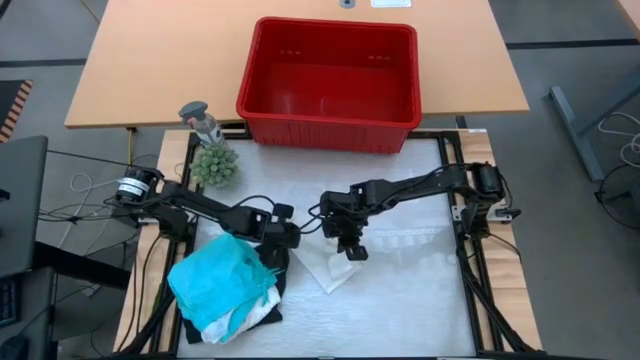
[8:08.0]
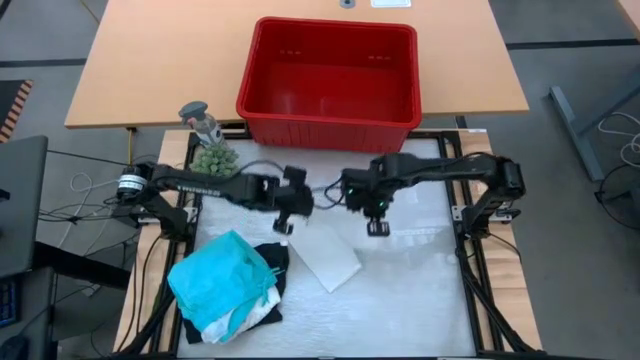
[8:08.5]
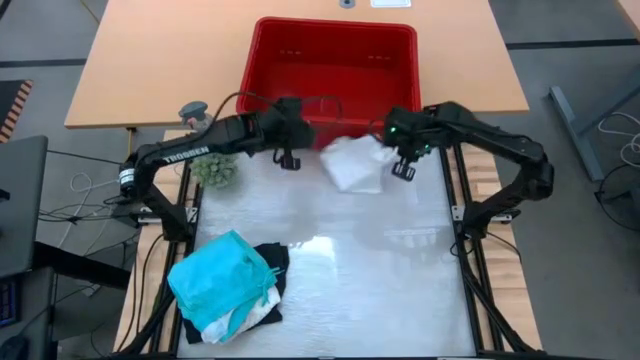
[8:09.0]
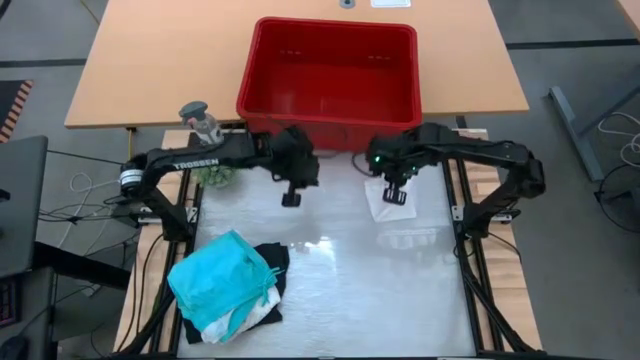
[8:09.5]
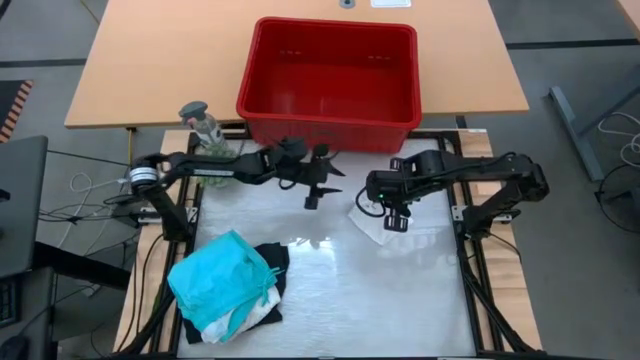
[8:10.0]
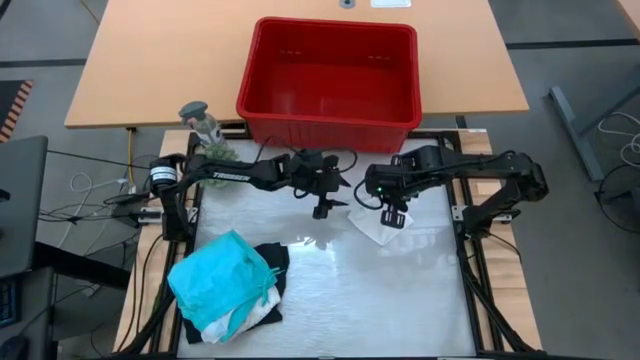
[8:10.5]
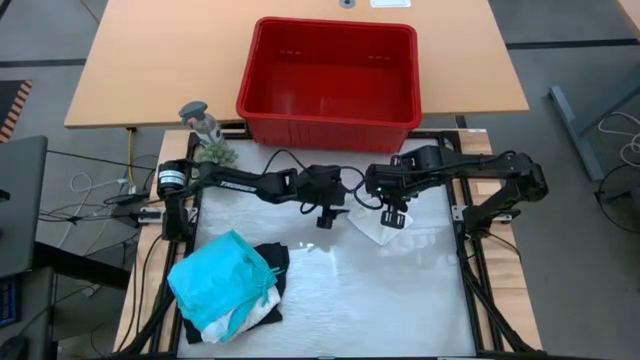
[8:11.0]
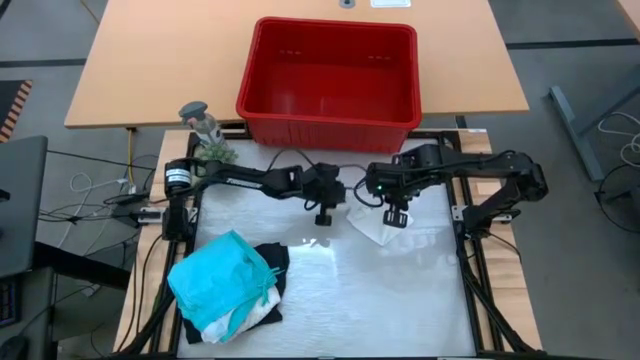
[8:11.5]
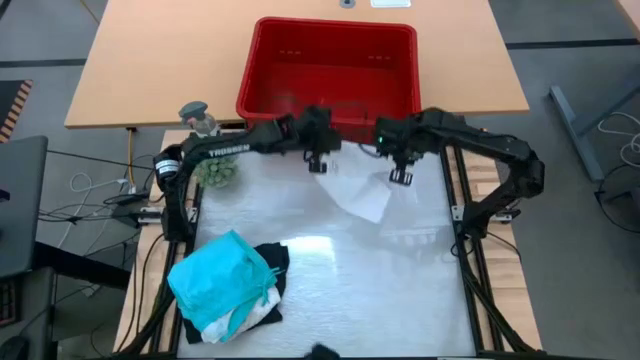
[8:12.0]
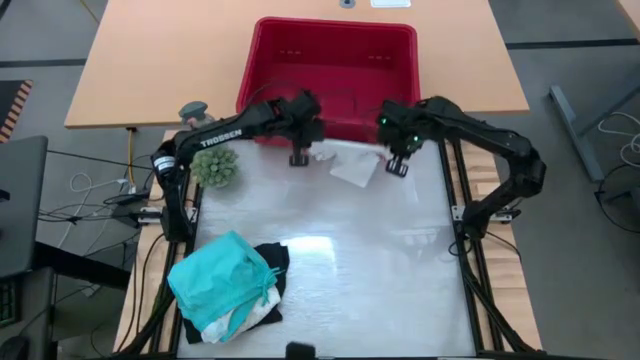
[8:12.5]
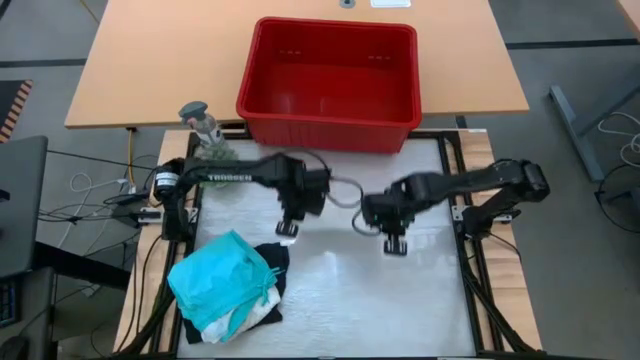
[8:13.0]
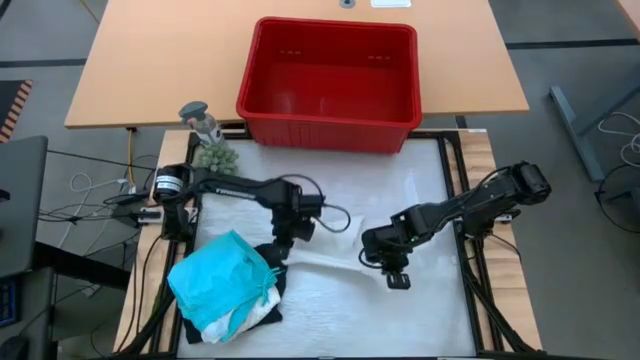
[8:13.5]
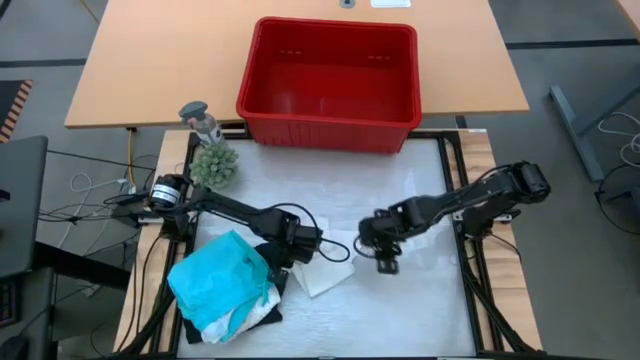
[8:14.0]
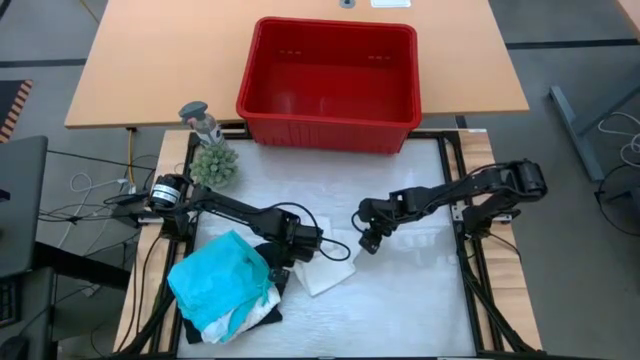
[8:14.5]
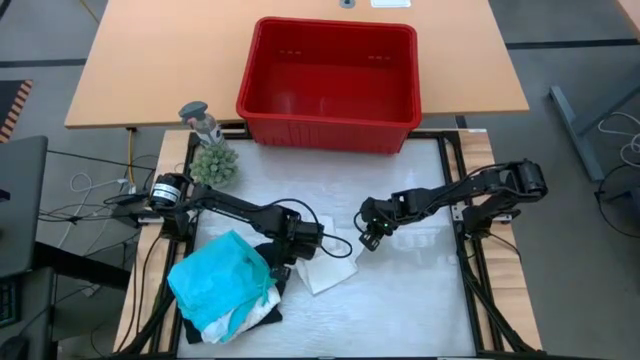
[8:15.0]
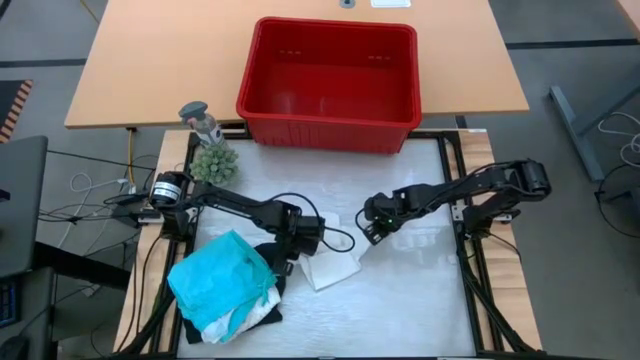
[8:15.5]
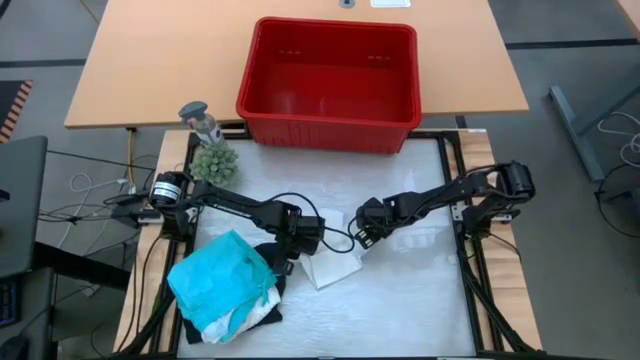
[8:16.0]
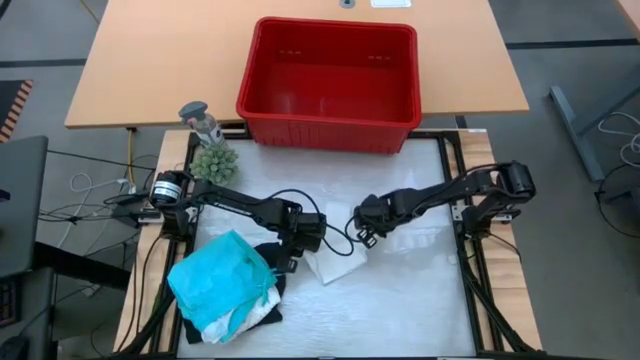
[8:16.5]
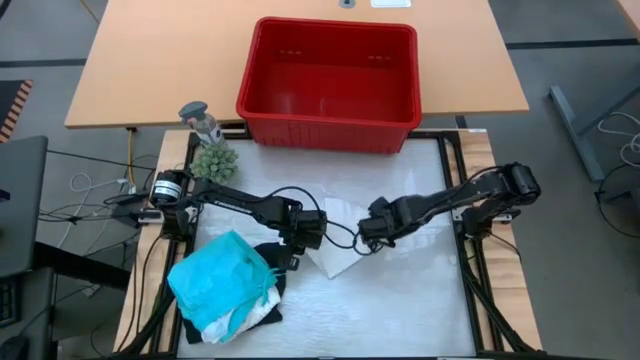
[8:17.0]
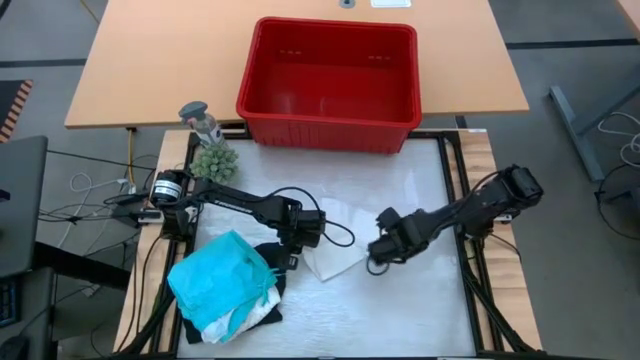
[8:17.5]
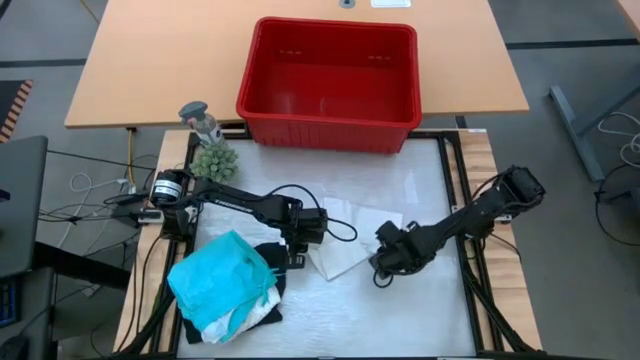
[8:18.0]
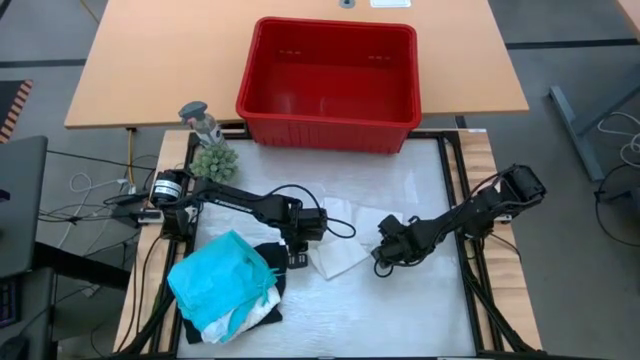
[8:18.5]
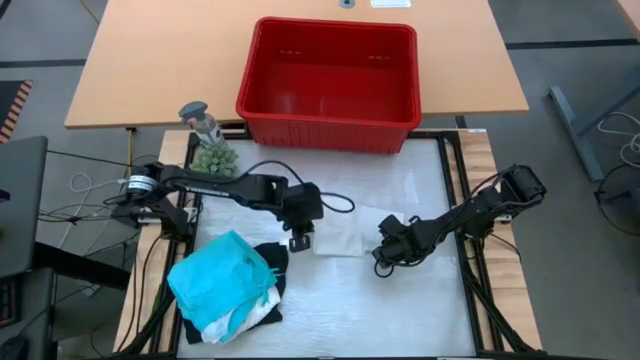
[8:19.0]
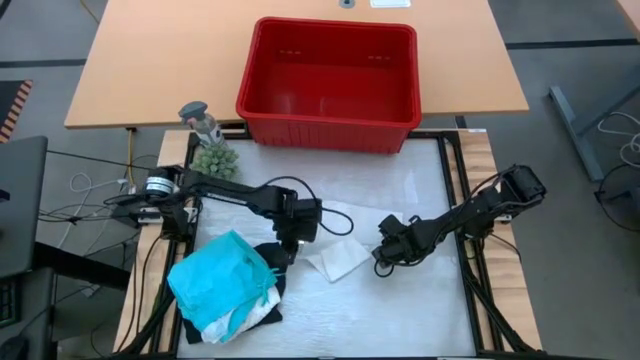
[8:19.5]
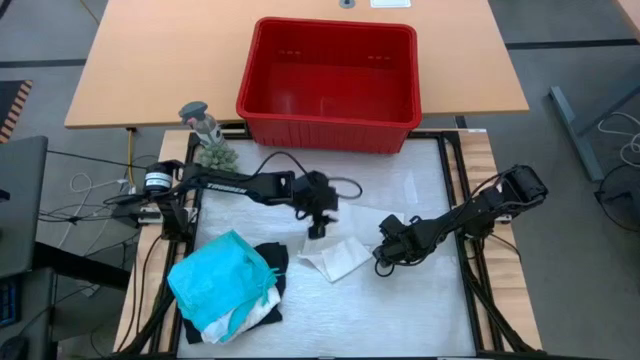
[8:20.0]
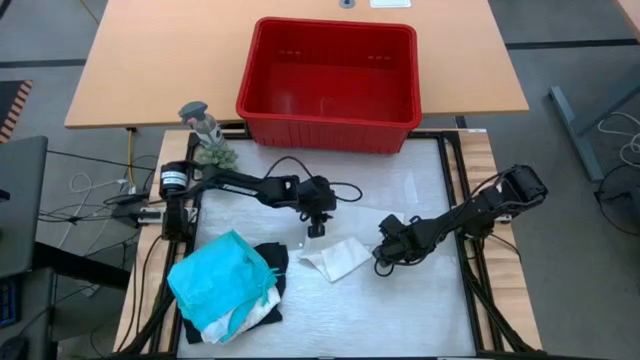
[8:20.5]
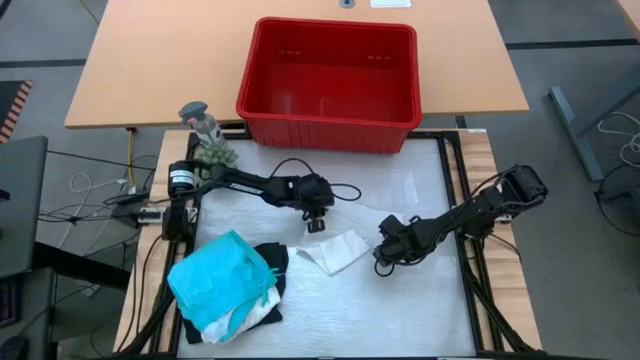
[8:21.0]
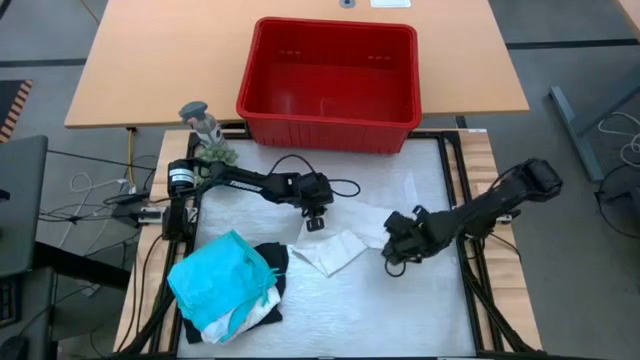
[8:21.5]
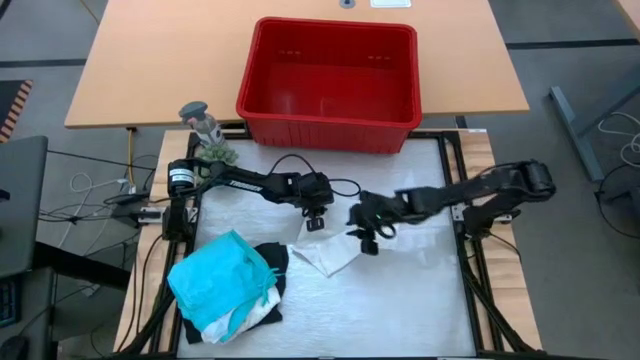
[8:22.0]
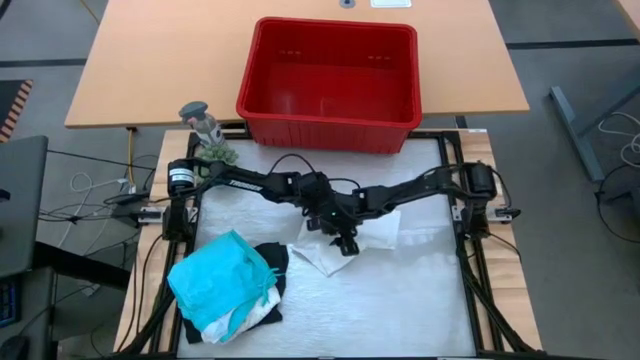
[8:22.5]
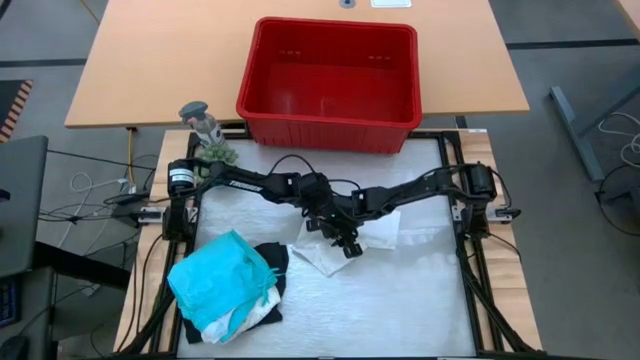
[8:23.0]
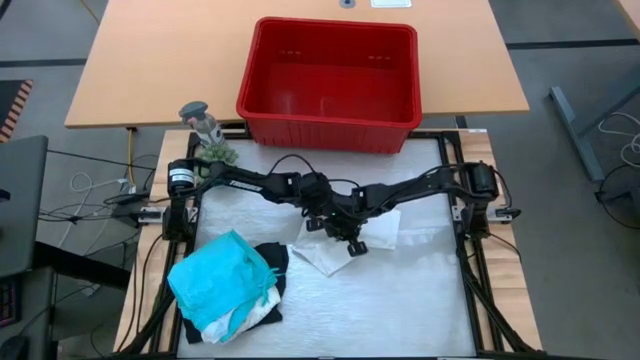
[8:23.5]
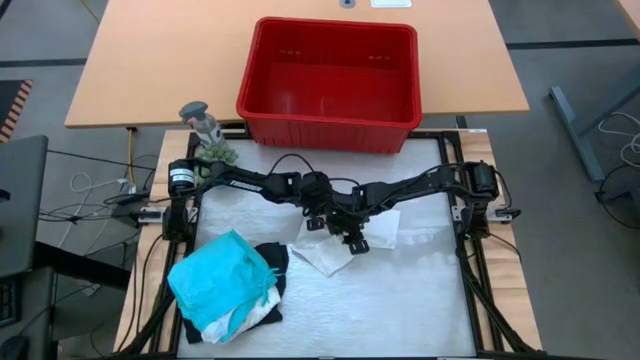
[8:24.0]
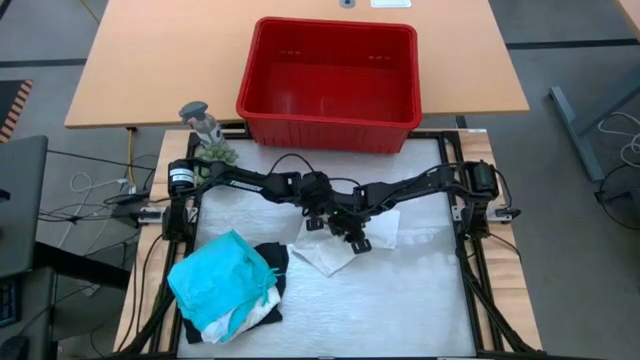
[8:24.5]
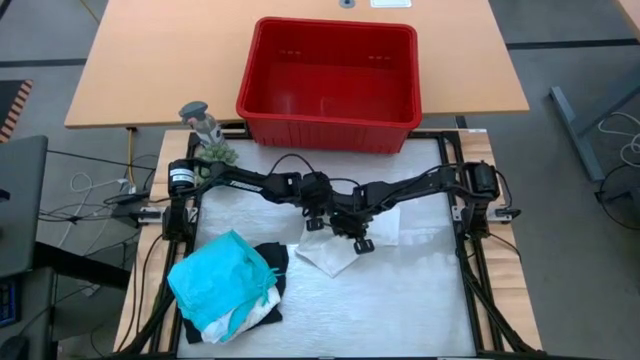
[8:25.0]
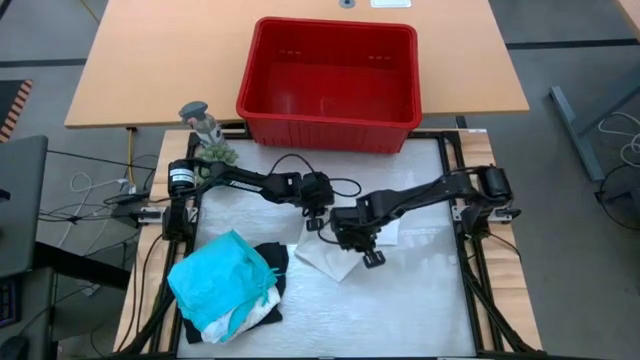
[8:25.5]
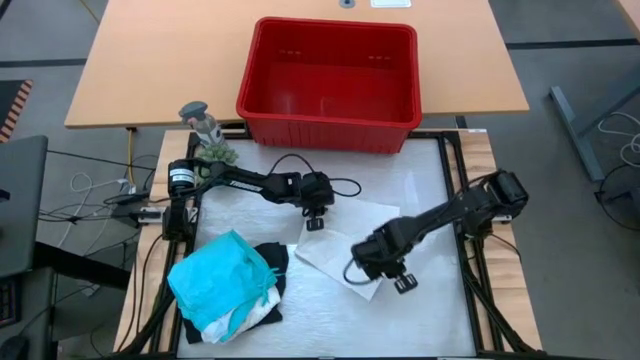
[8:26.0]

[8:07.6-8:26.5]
Task: Fold Laundry from Bin
Fold the white shorts

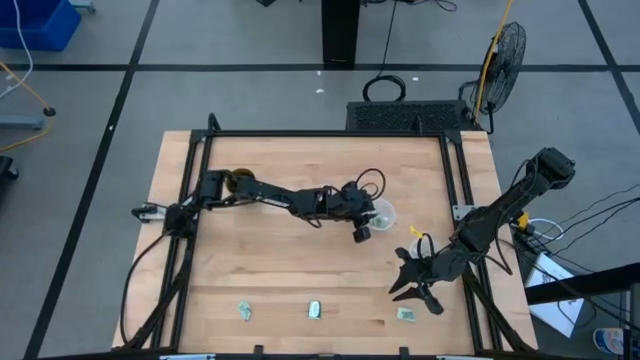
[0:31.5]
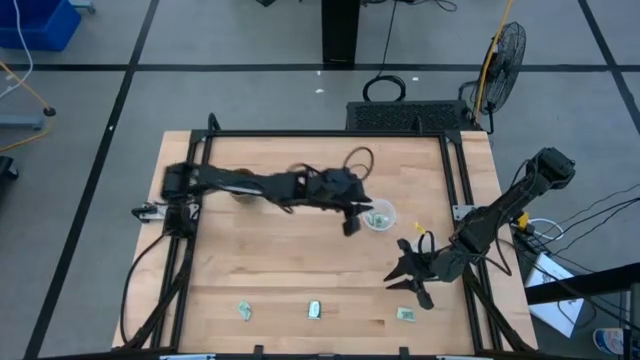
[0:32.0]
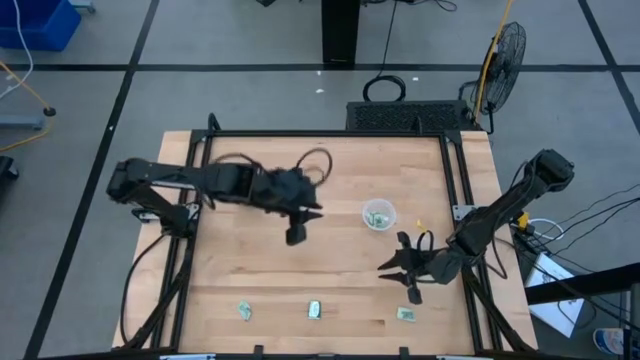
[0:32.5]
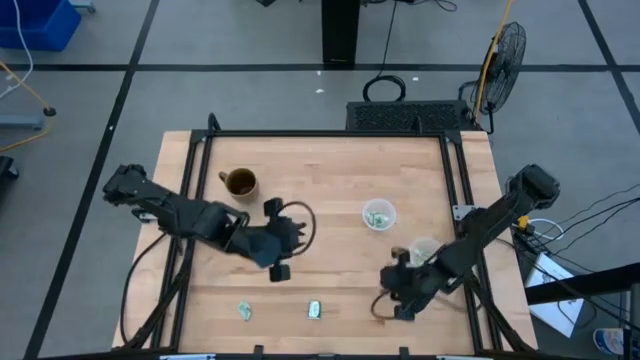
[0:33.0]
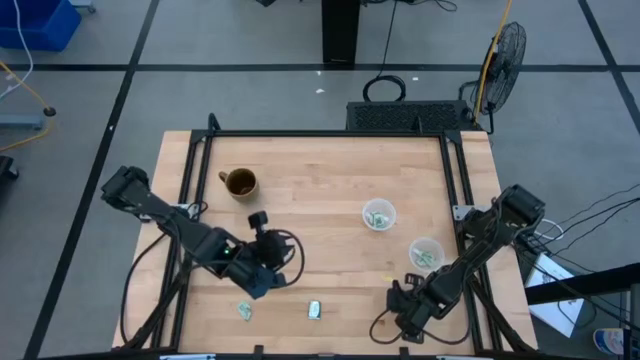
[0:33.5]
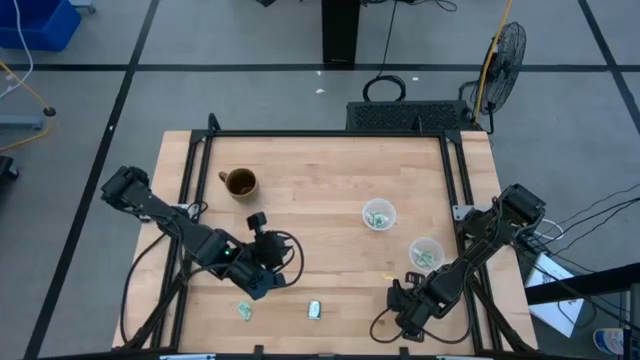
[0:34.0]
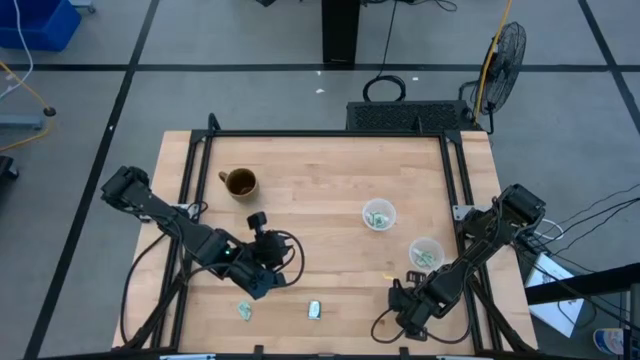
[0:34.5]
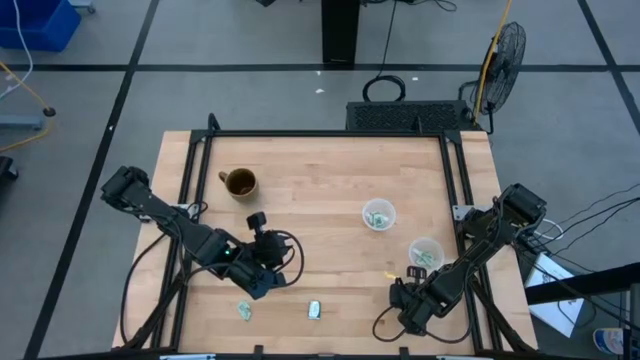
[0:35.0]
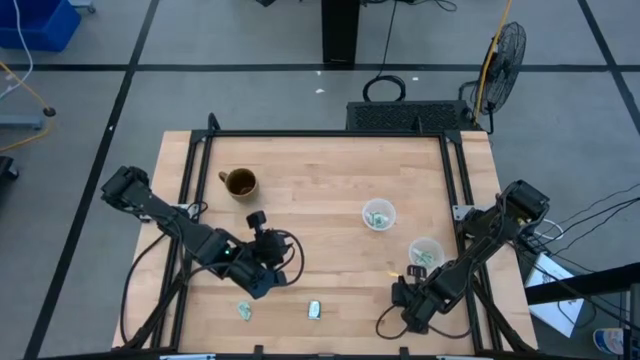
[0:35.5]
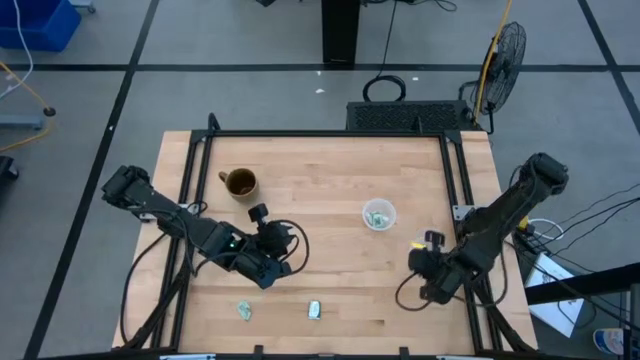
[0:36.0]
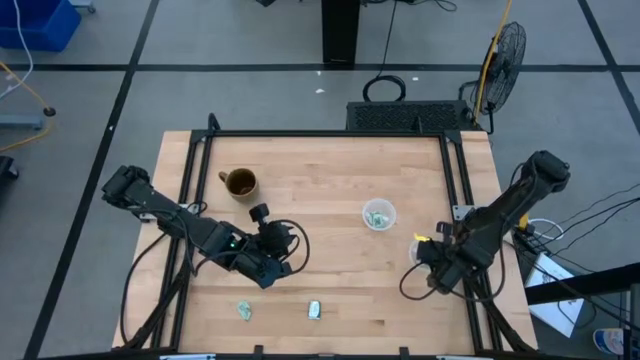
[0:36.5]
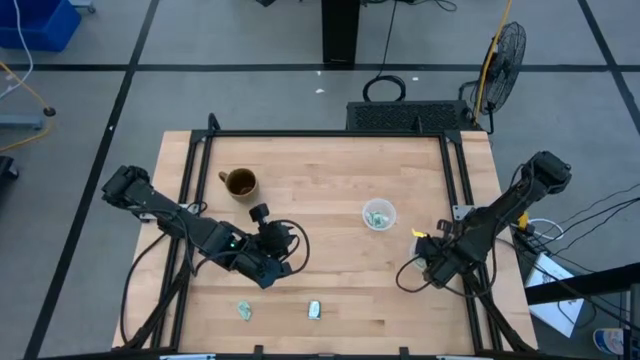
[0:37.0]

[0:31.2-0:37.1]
Task: Pick and place items into bin
Put the white stevia packet into the bottom transparent bin
